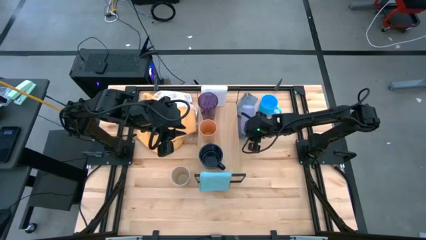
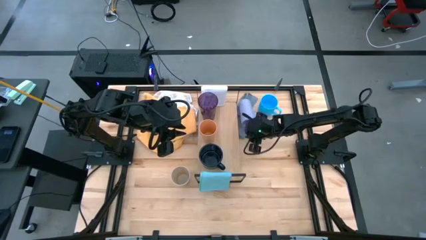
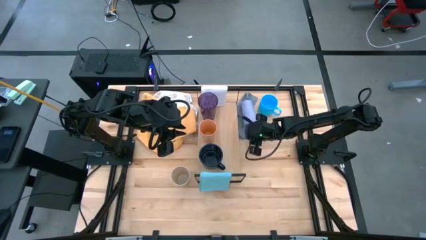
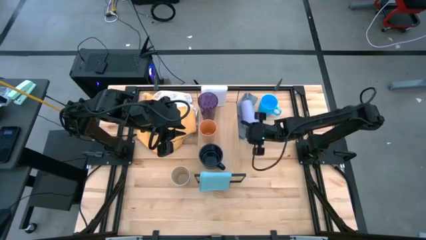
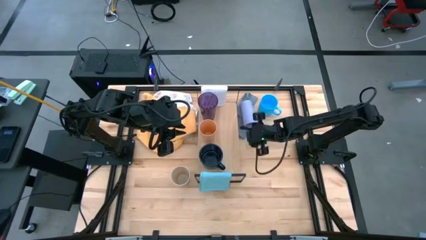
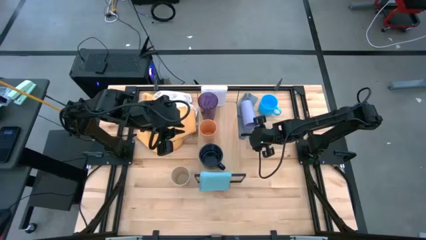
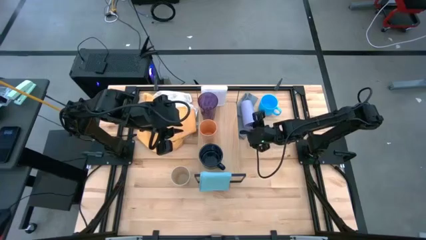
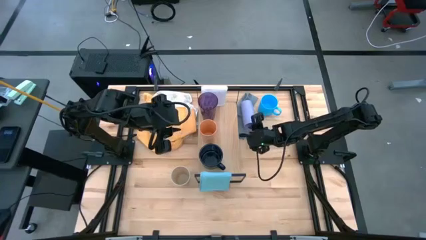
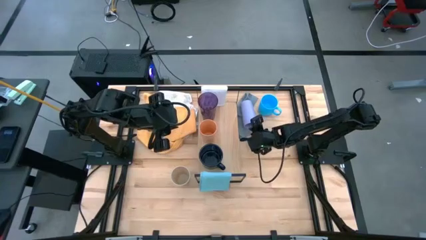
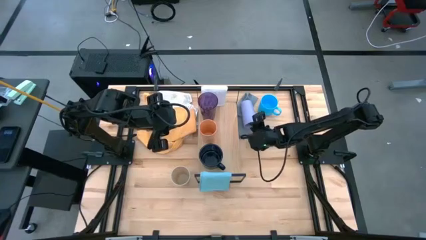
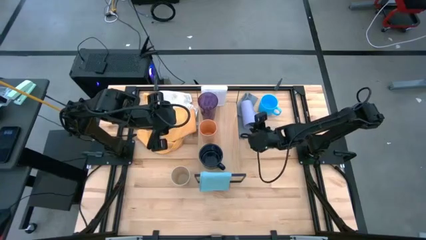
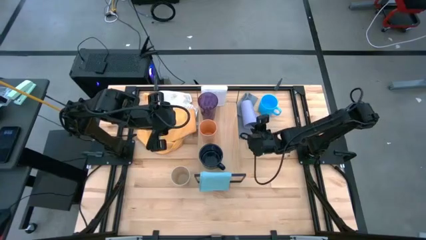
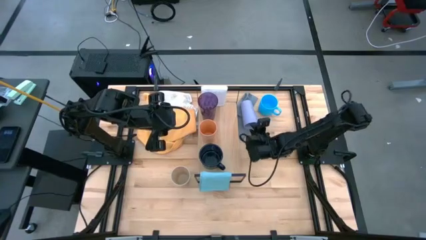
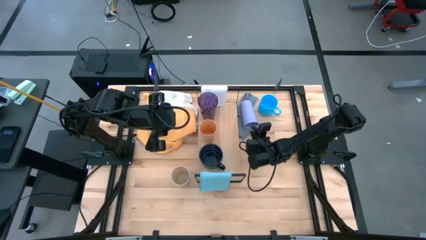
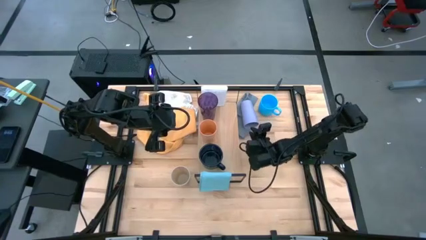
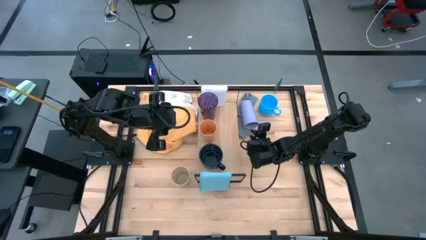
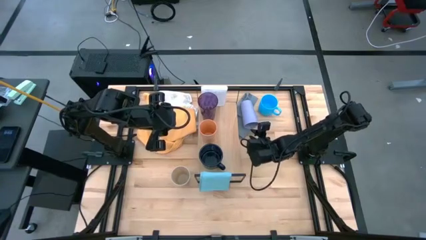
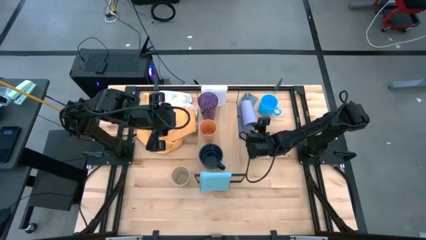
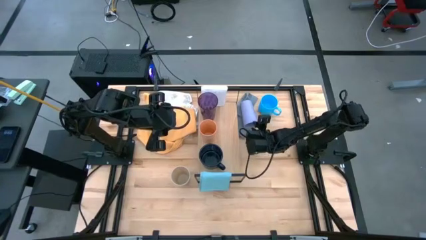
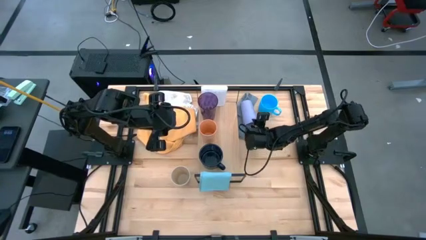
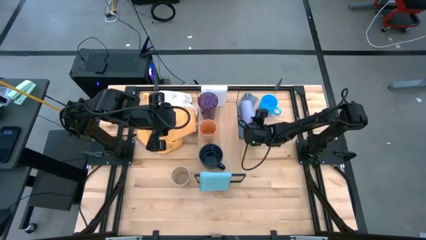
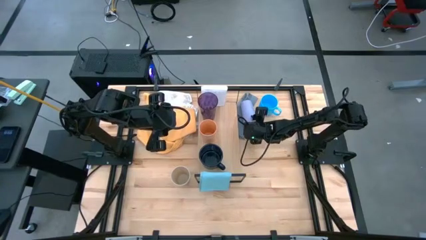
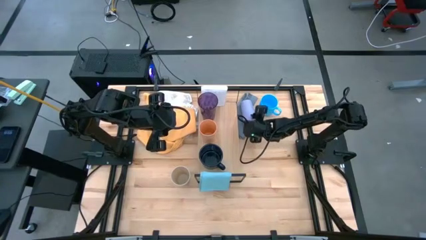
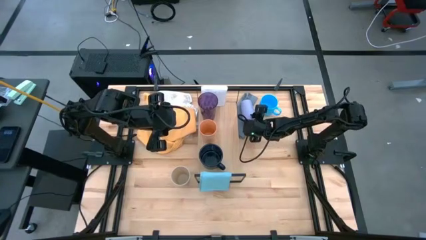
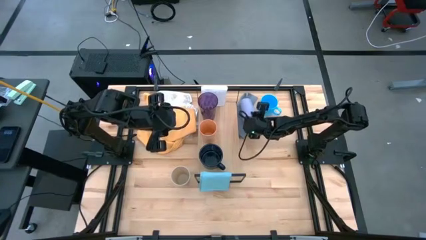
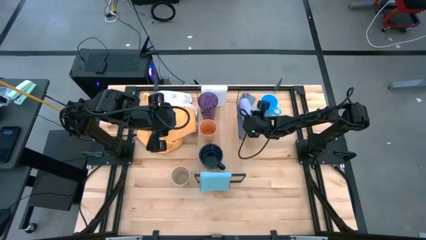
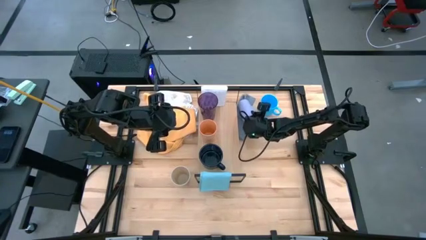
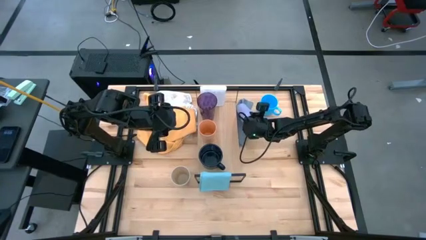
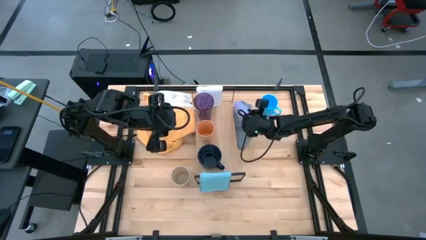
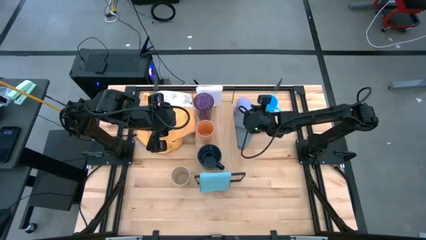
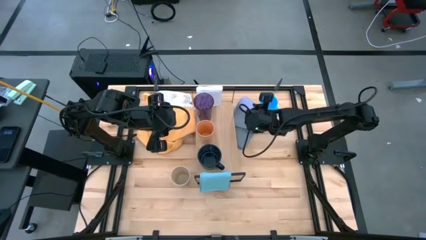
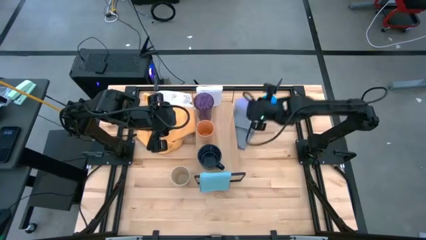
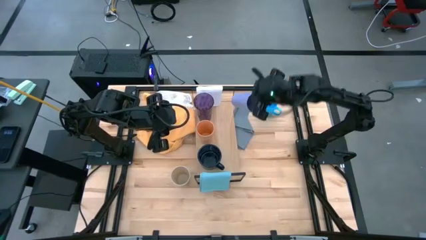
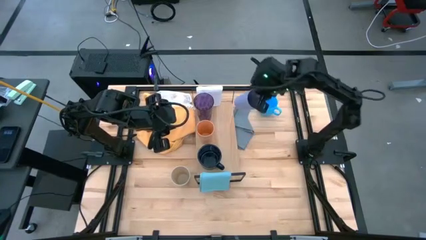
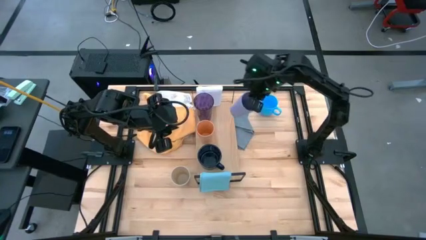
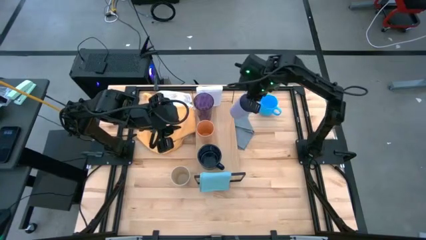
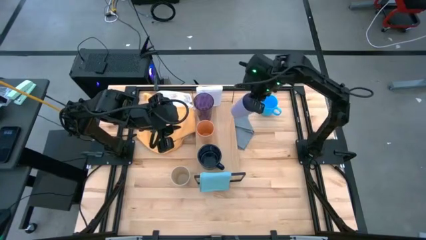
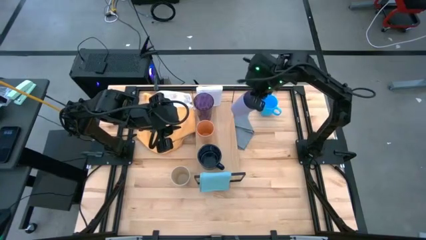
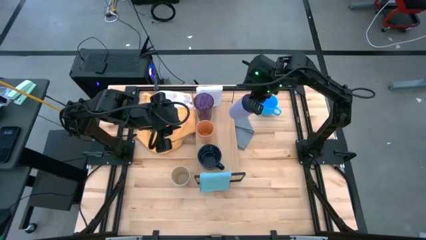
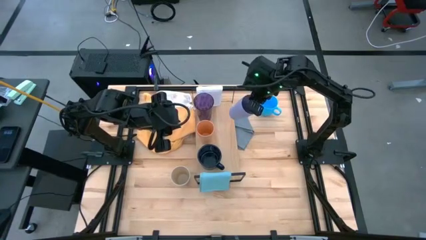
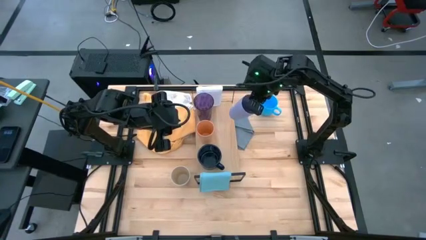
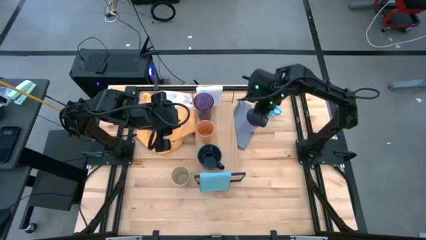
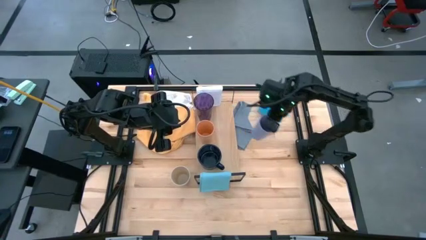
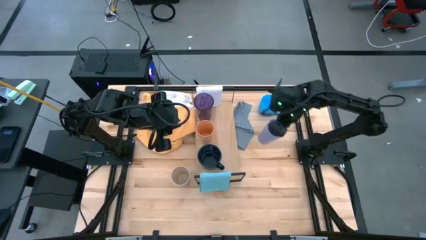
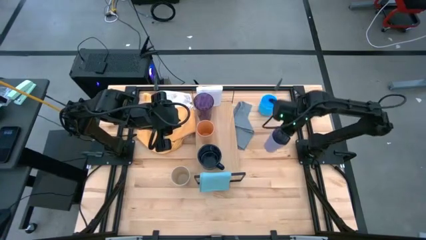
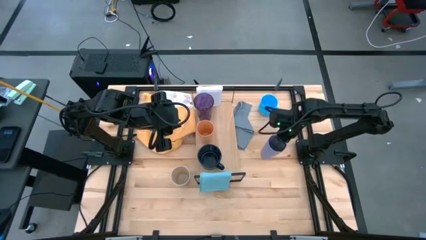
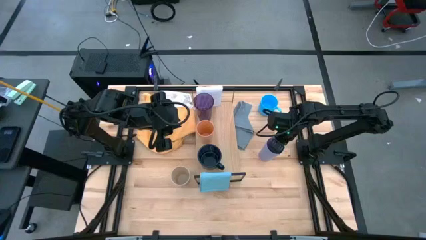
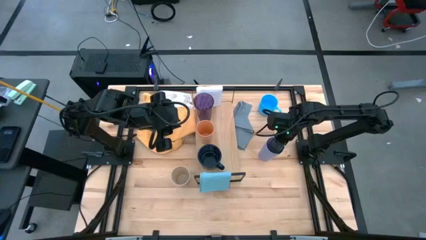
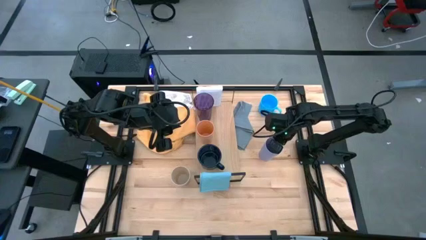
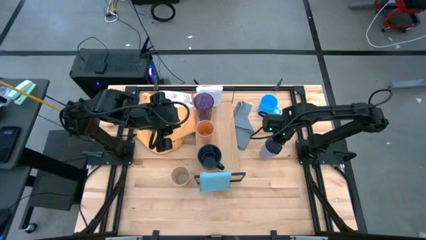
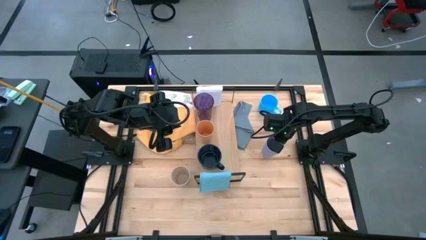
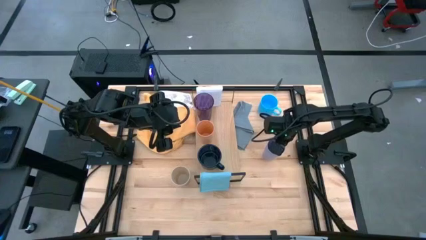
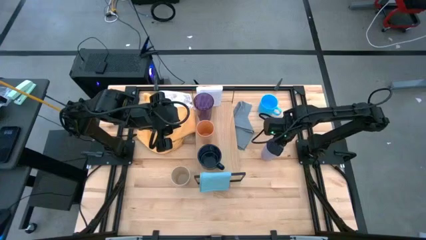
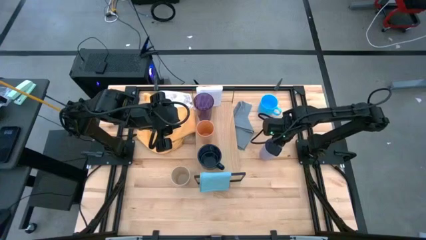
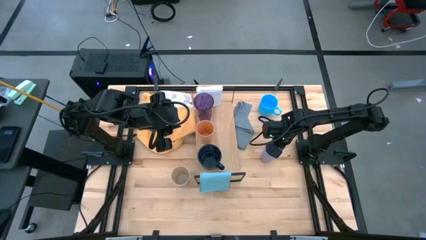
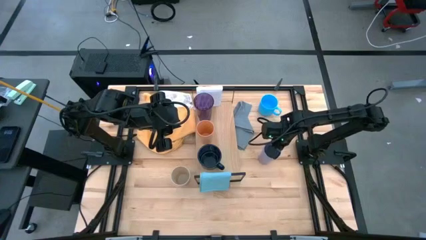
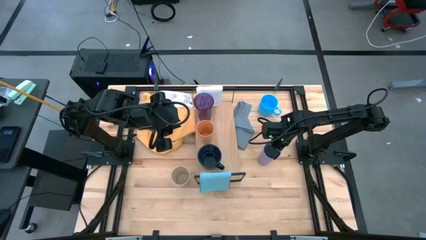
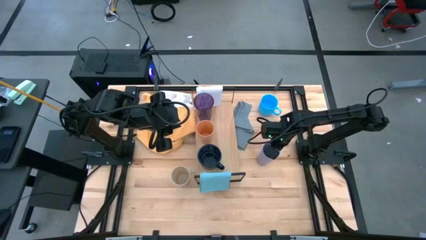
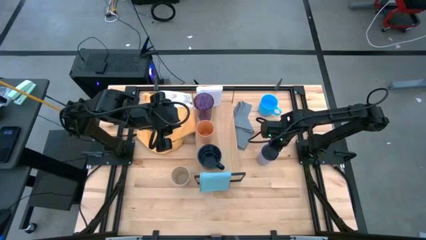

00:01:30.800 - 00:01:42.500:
Task: Stack small to large cups/mugs on shelf
Move the light violet cup to the middle right of the table

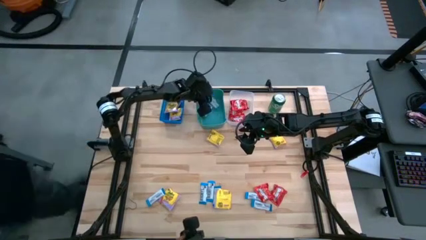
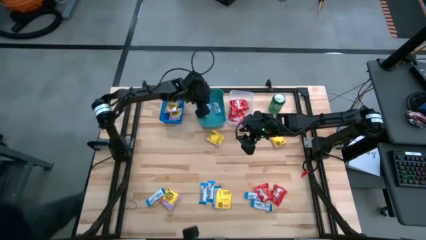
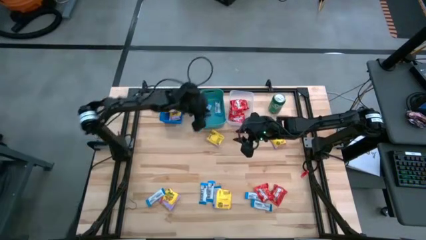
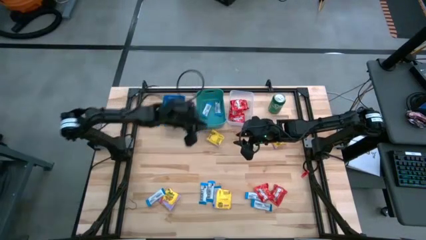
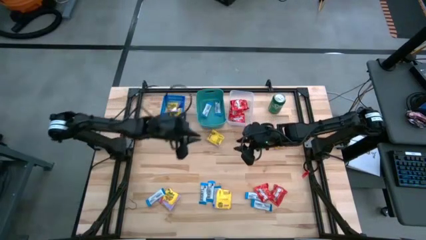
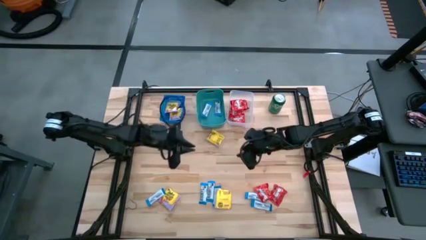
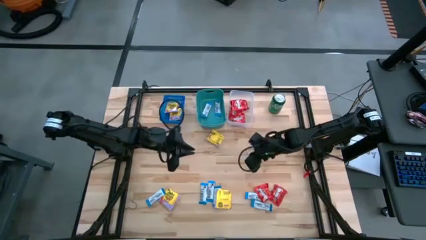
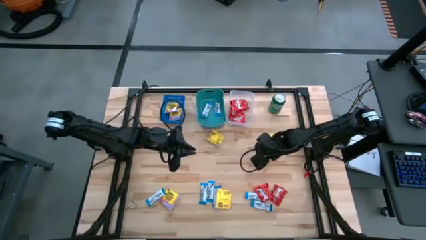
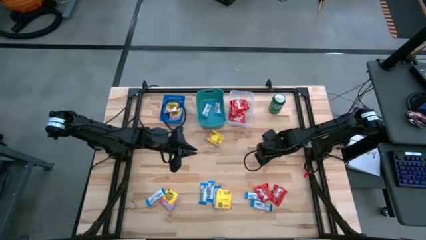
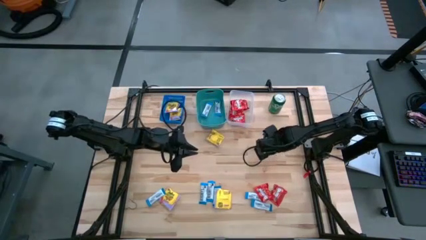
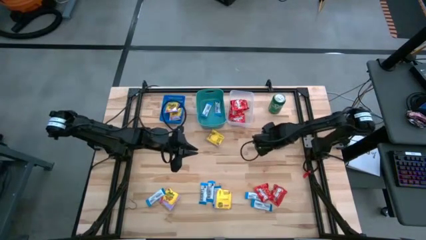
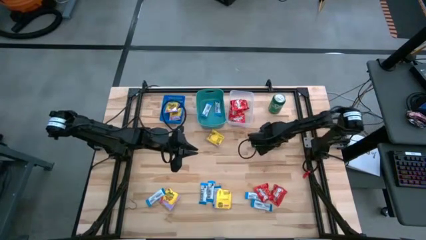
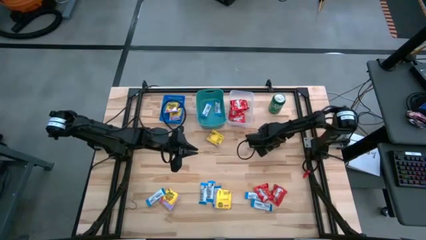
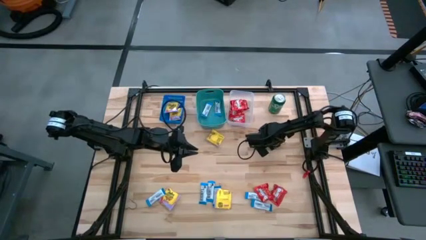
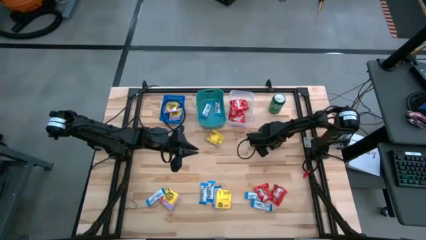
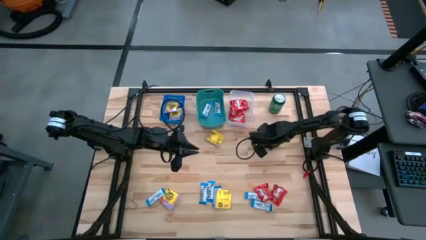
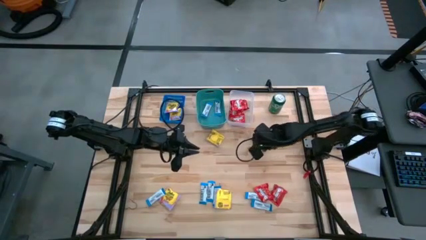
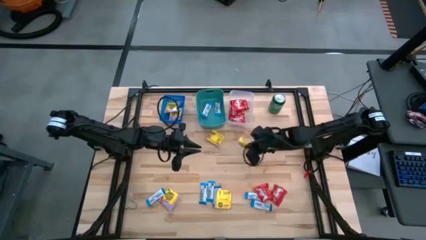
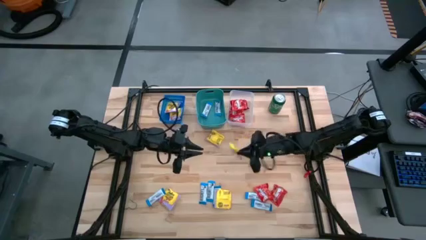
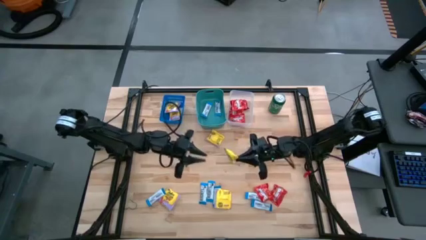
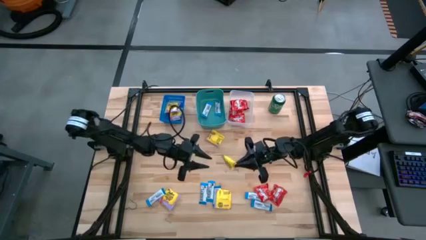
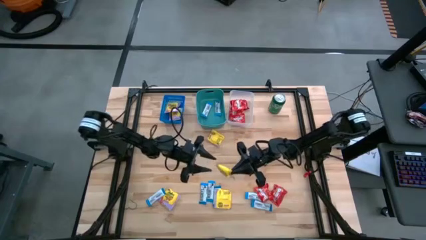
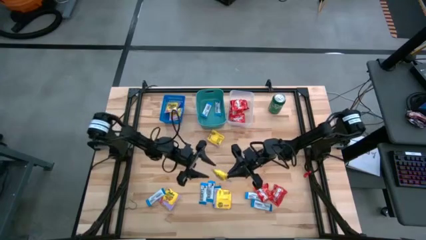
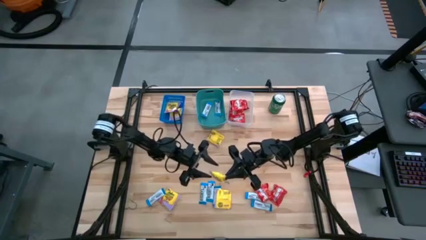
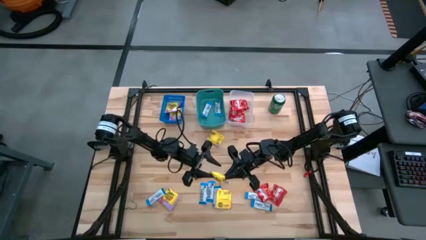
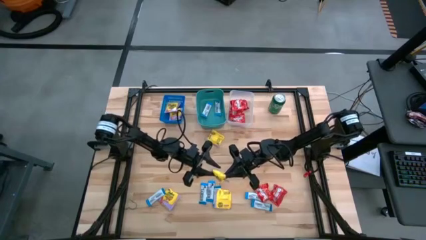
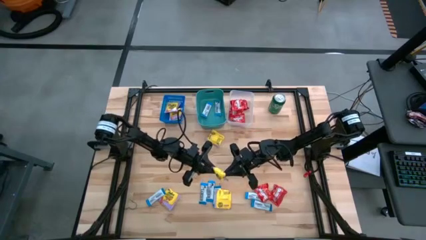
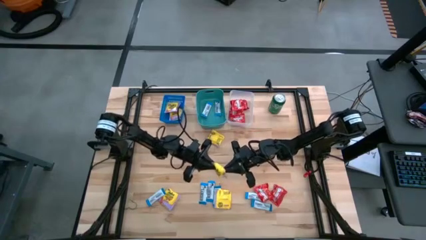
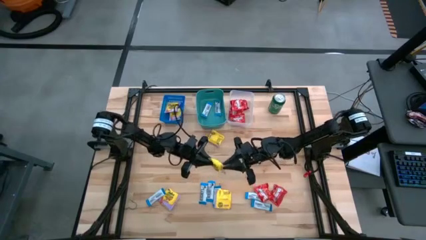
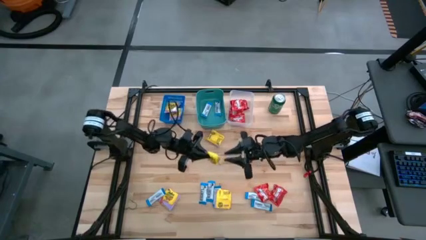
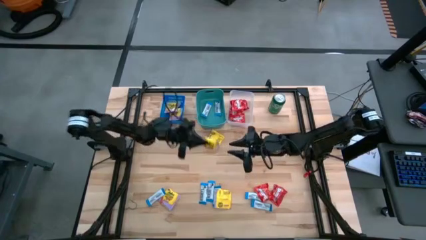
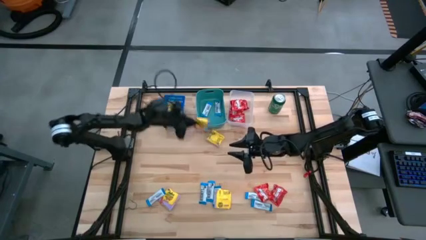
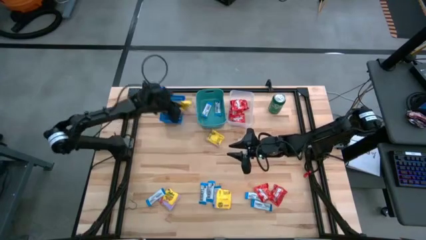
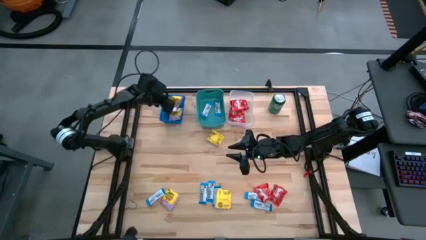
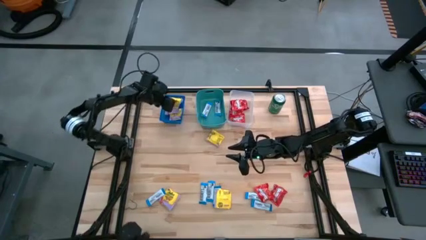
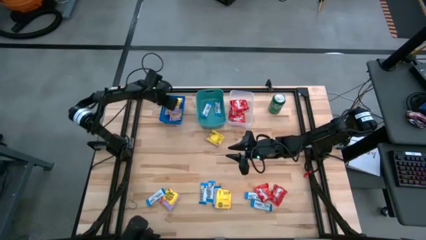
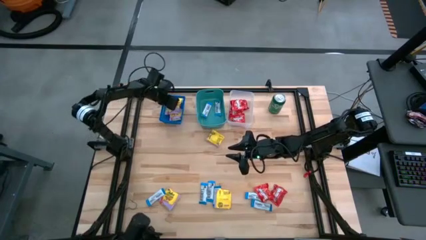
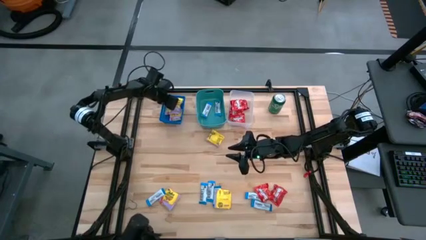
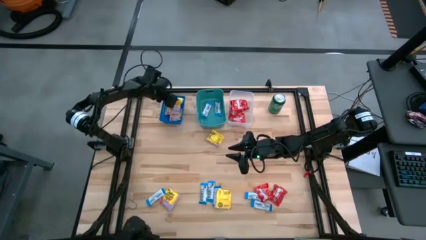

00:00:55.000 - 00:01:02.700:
Task: Sort candy
Put the yellow candy into the blue bin
